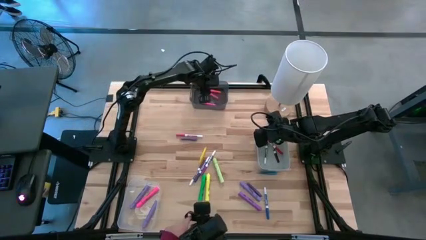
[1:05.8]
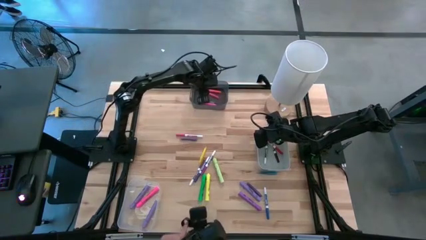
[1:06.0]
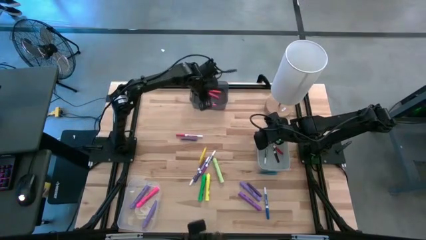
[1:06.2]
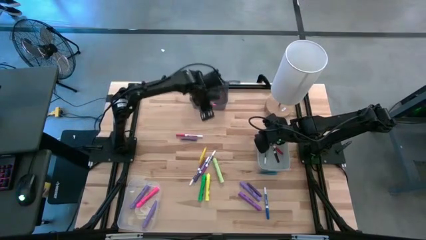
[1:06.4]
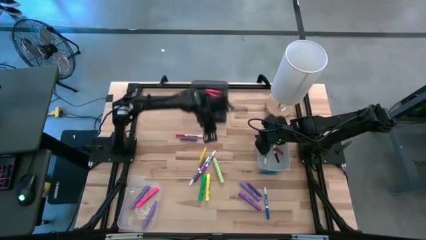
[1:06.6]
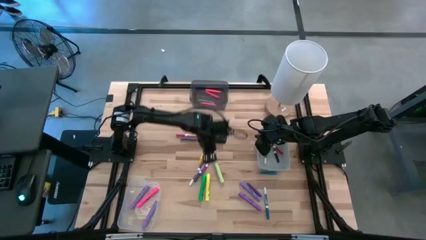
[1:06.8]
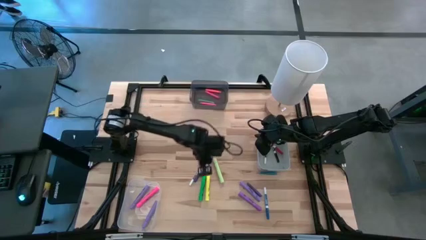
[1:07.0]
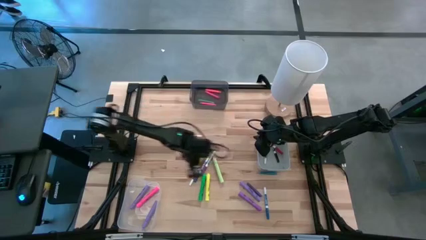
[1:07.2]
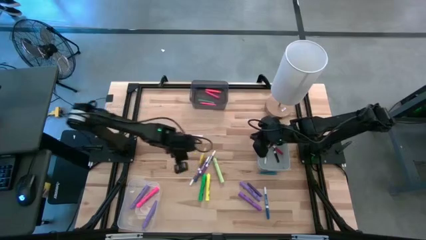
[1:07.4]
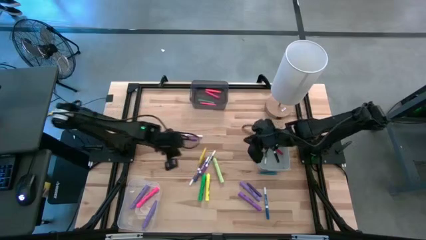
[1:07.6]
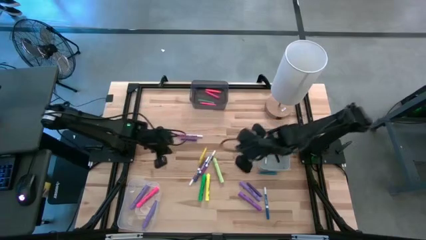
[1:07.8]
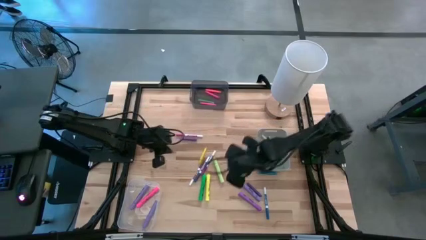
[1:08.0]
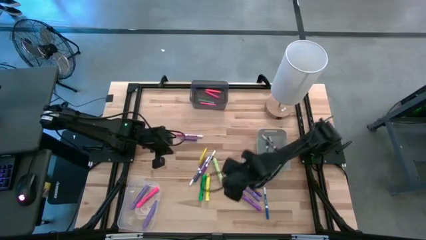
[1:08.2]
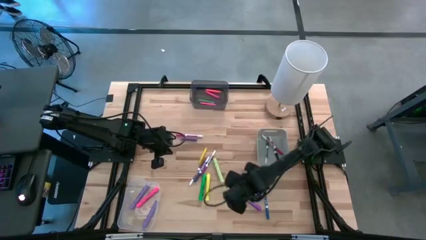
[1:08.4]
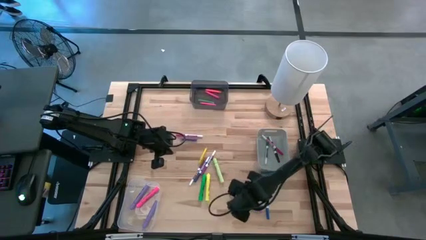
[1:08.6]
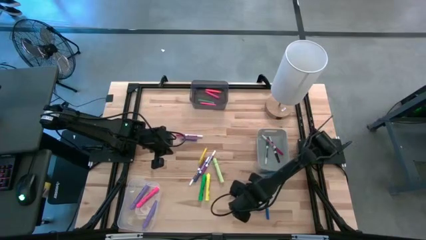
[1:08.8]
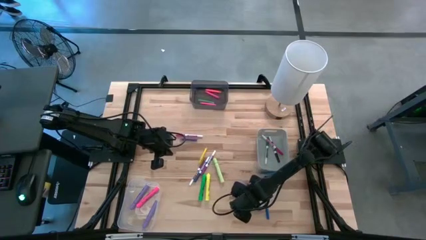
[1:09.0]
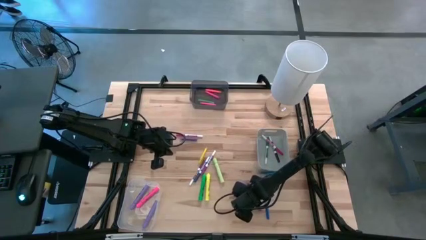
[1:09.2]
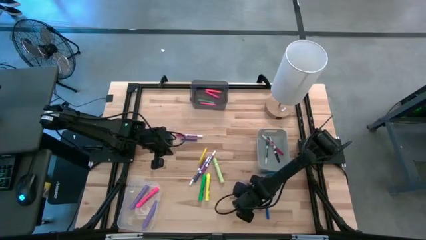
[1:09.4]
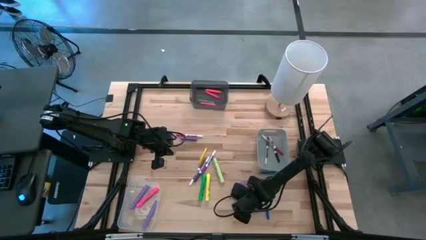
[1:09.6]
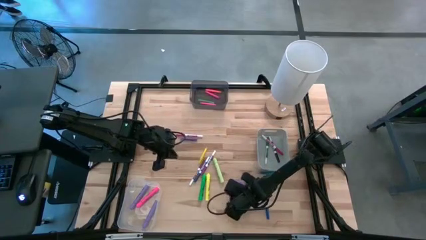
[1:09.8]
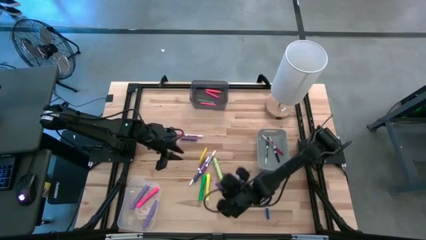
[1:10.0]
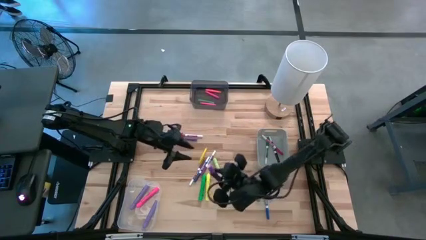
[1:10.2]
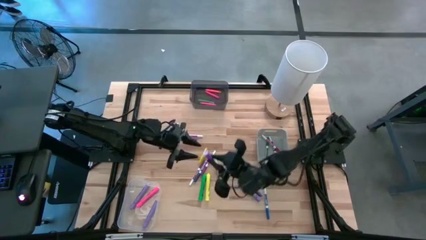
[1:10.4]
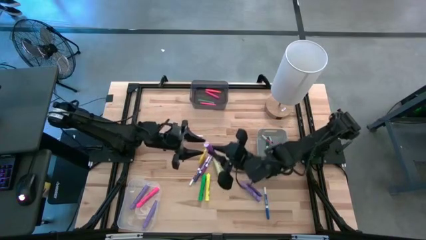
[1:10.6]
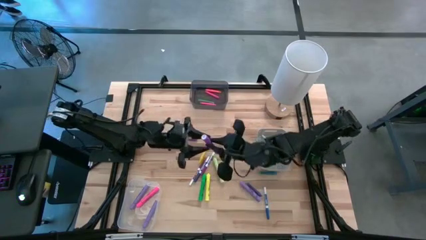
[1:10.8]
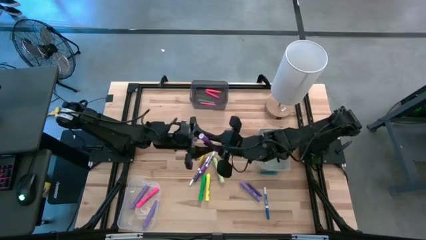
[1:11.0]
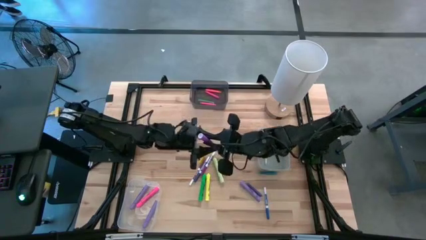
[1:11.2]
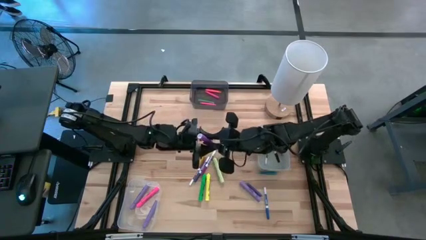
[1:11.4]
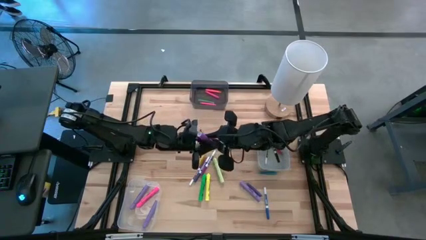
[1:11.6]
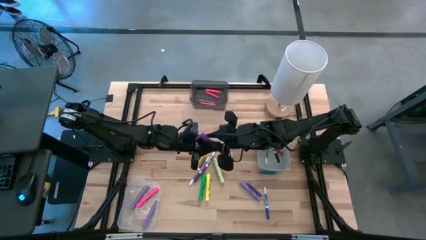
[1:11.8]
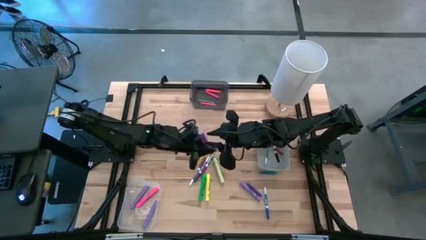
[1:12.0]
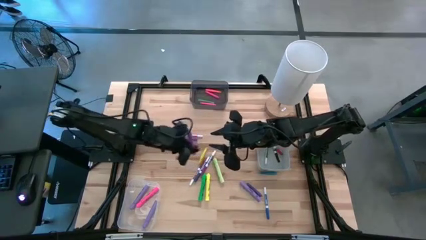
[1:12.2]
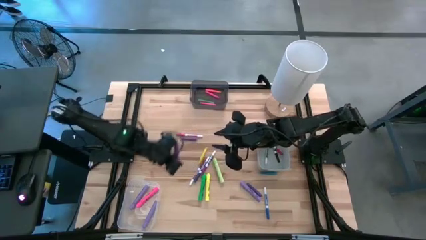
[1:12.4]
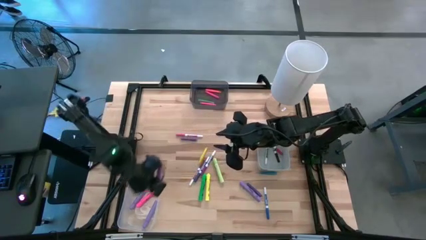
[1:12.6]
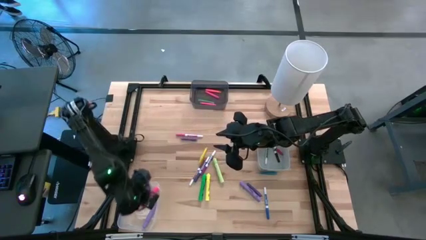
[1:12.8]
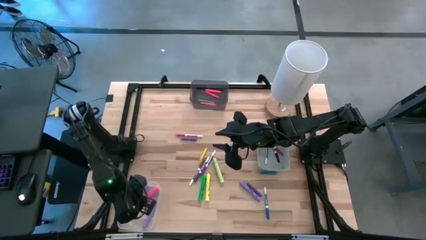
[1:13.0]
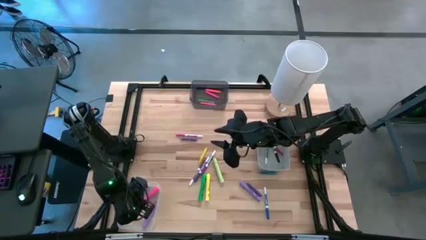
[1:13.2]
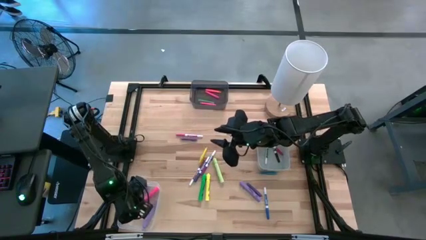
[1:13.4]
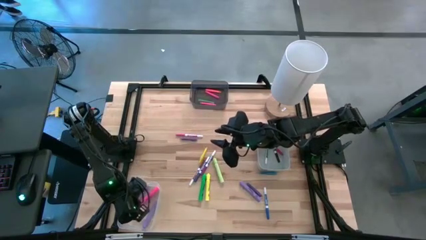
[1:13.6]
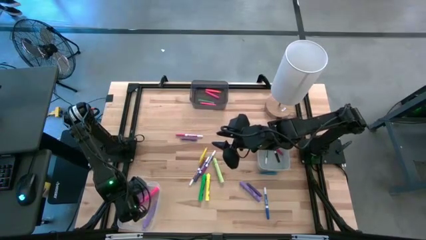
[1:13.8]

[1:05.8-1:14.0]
Task: Pick & Place Markers
Put the dark purple highlighter pen into the transparent bin

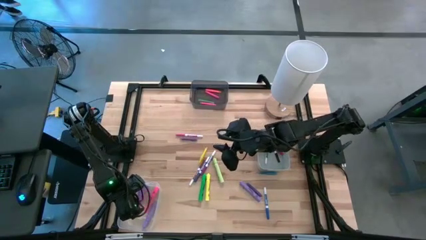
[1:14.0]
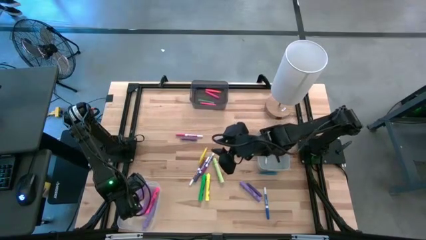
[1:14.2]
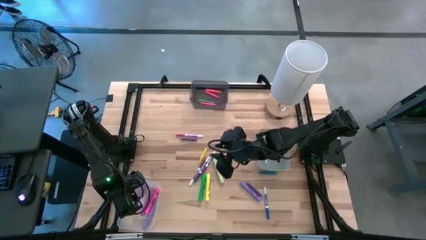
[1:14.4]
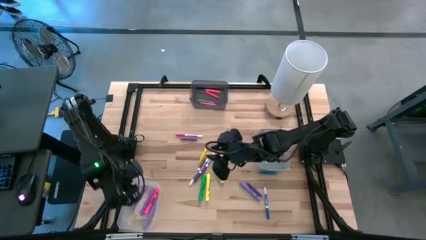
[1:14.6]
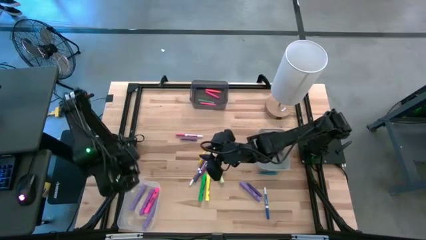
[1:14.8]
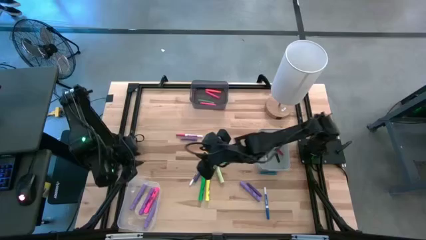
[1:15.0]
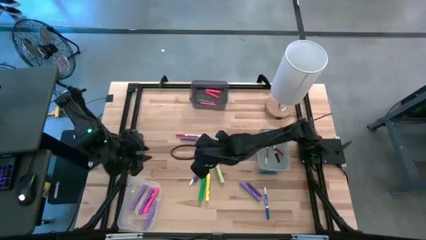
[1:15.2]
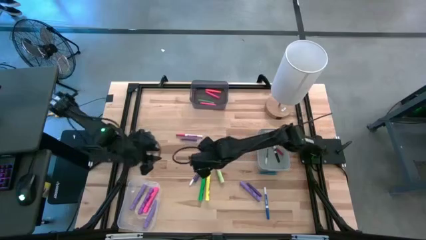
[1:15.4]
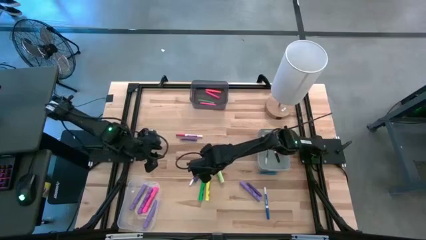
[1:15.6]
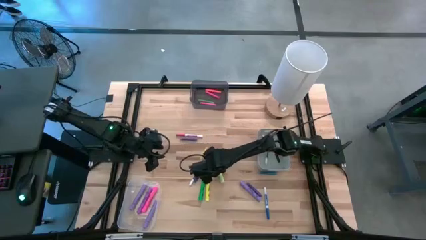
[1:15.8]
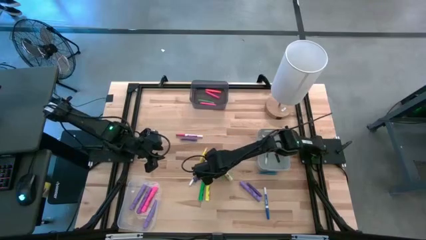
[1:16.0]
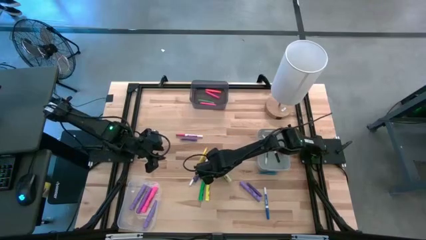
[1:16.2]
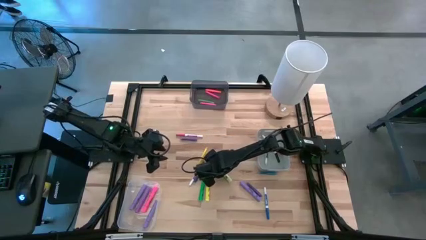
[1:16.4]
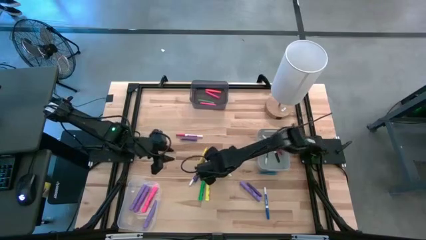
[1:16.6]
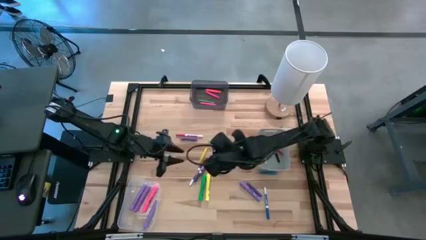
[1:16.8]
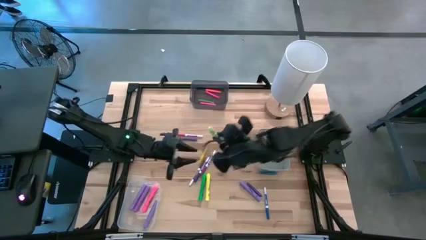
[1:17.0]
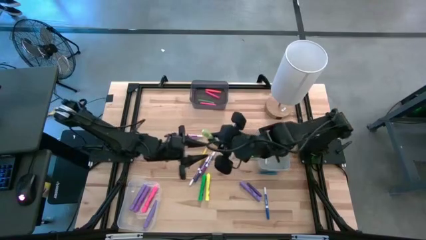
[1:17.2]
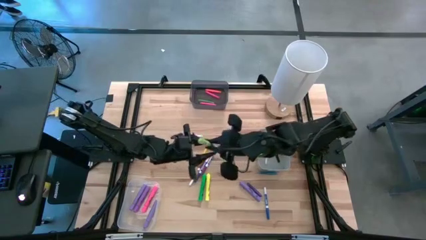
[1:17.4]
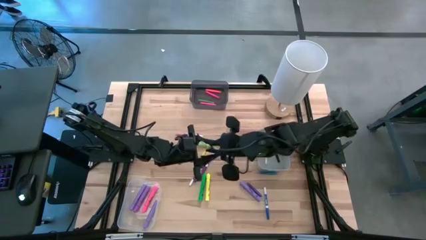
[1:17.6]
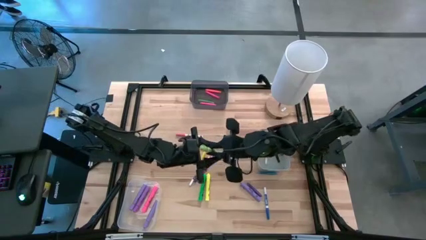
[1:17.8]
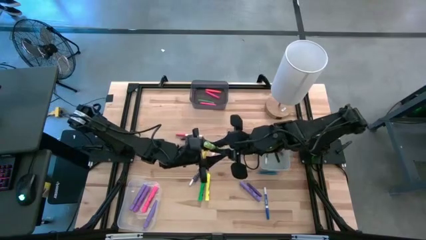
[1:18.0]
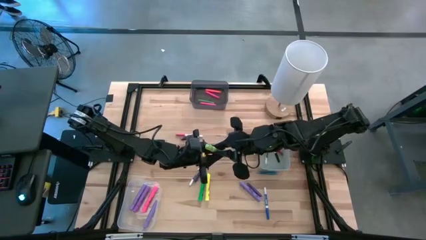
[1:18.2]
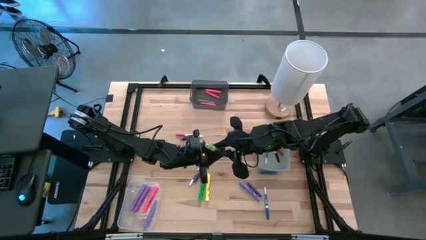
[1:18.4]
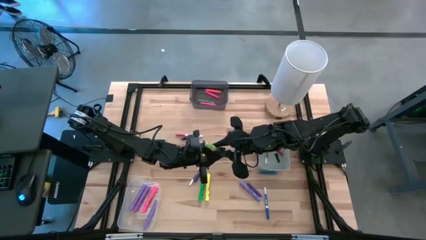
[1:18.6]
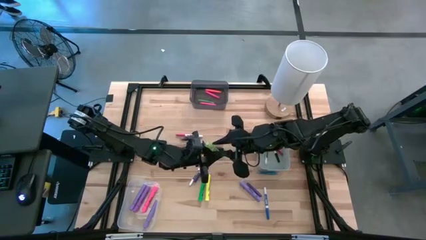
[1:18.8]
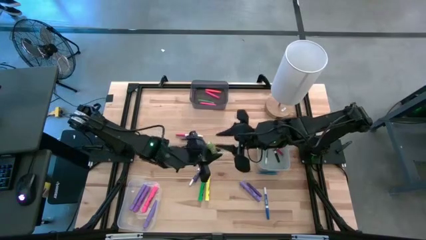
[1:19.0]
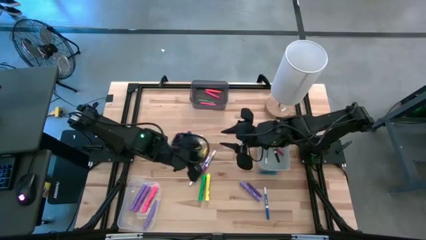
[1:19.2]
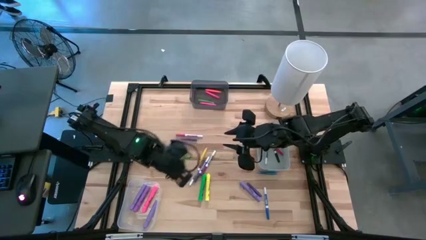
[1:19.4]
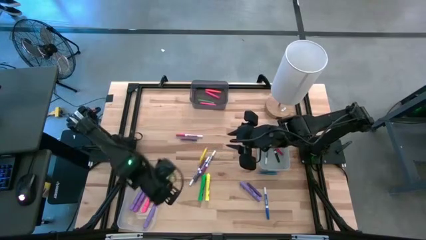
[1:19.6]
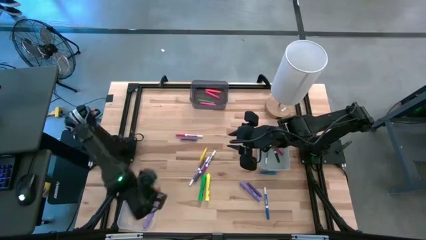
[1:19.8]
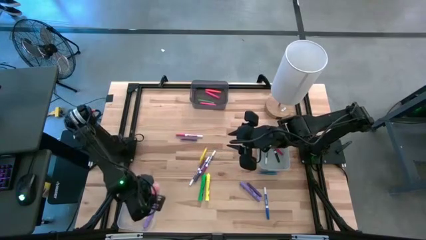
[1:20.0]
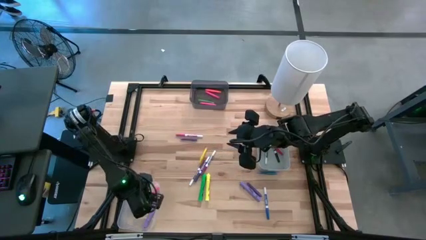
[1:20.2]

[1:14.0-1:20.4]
Put the light green highlighter pen into the transparent bin

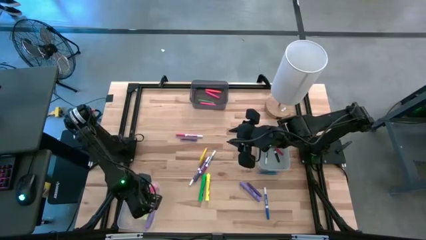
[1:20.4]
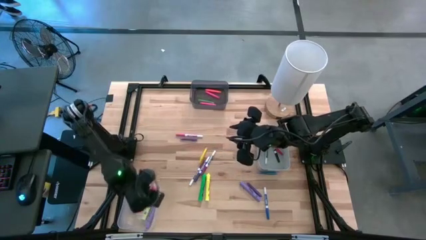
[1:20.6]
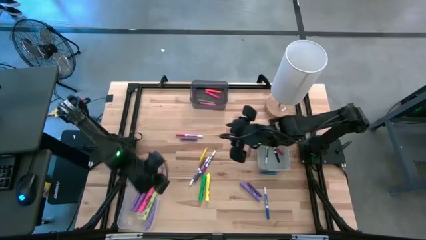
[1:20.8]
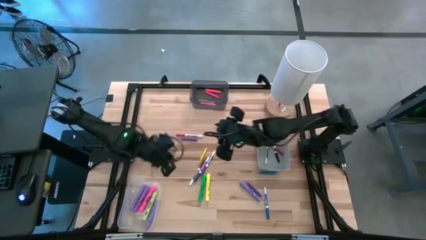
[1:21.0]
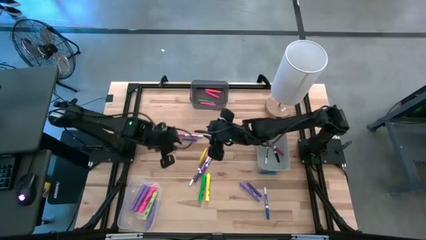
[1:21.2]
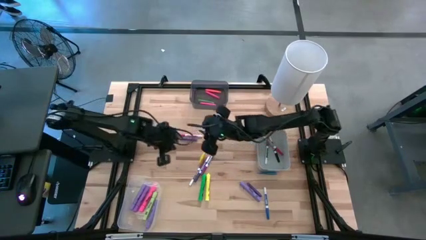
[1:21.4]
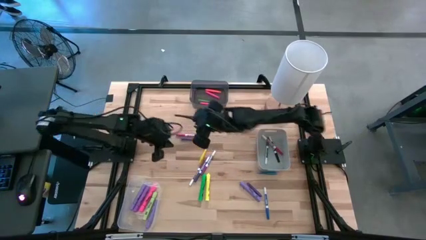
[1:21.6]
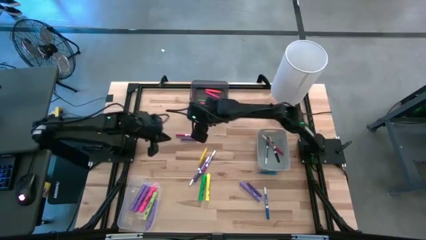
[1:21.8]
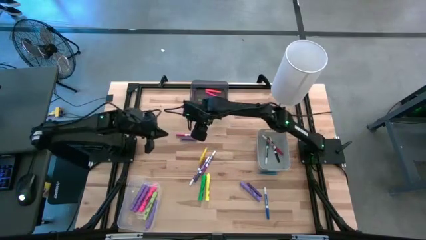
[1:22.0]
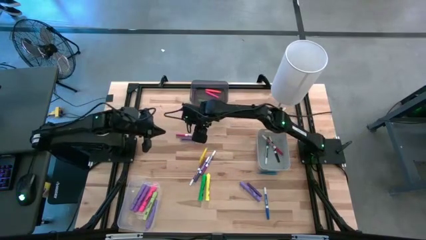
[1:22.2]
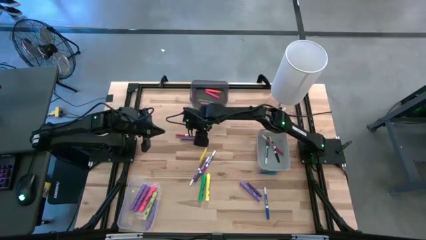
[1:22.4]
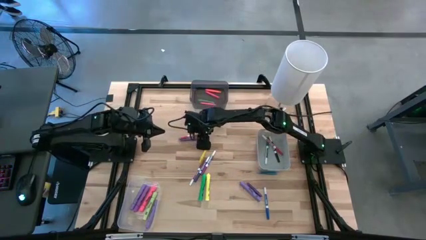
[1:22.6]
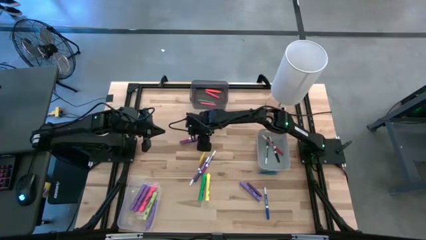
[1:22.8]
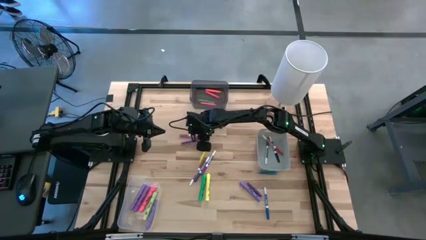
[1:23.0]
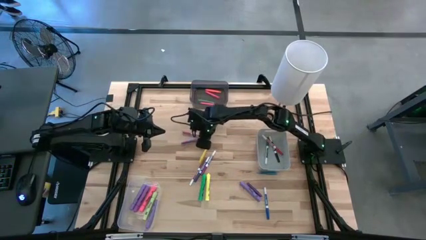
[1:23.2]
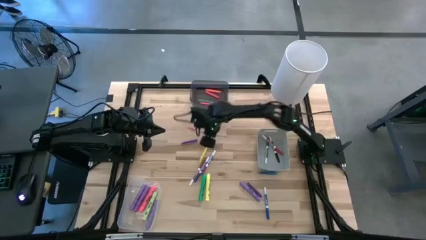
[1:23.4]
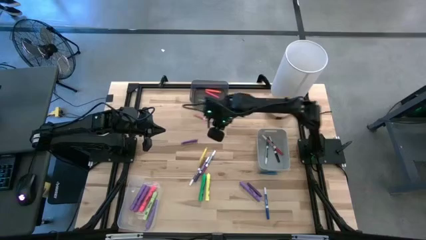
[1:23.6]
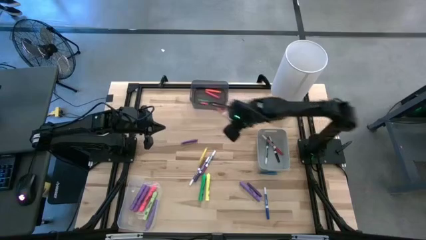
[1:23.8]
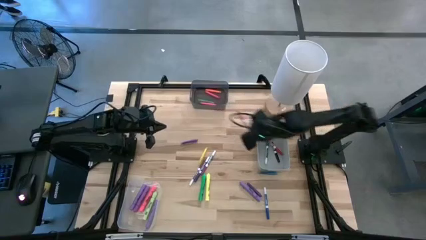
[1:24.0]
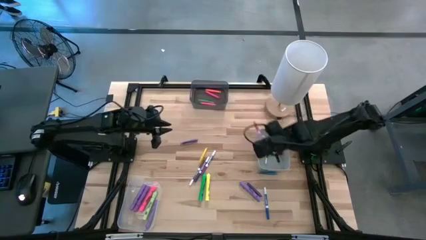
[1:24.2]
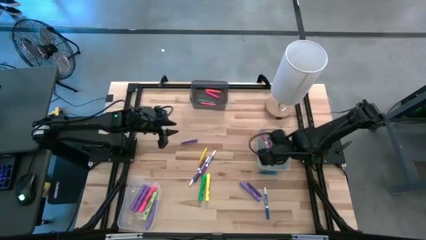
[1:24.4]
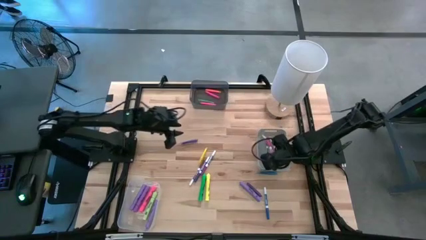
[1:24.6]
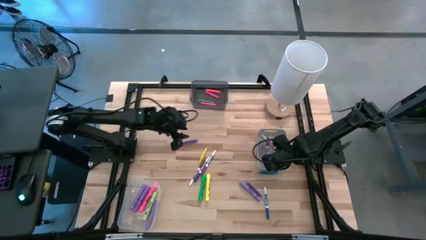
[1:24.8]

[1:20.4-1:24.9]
Put the pink marker pen into the gray bin
